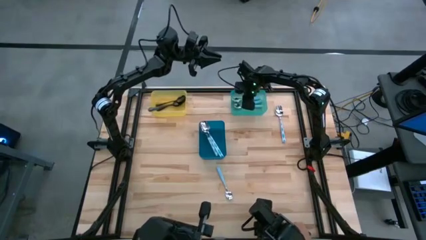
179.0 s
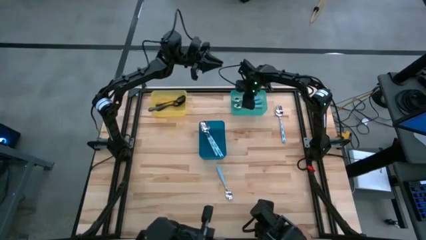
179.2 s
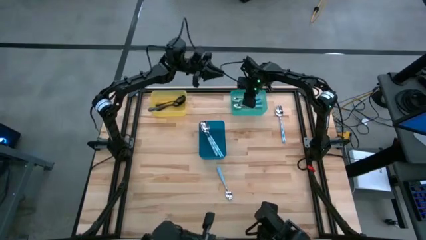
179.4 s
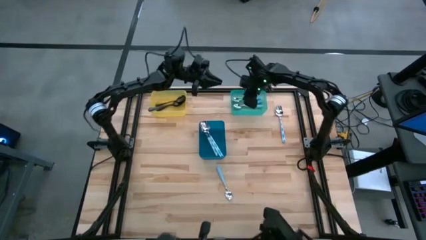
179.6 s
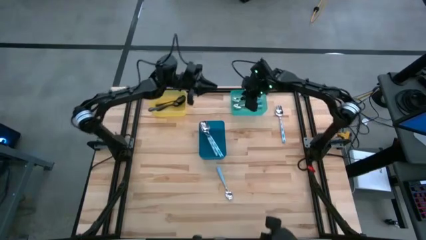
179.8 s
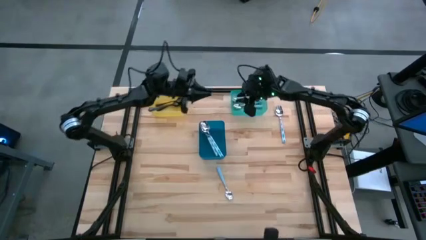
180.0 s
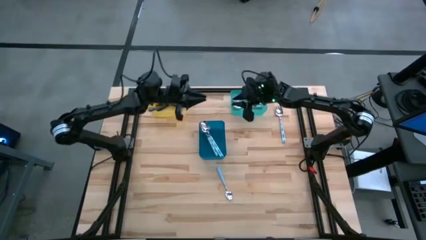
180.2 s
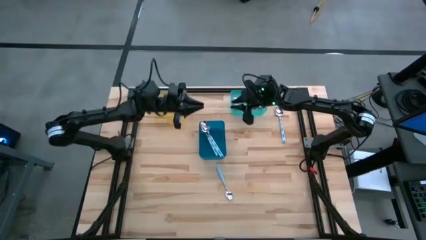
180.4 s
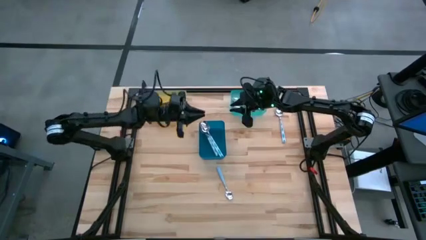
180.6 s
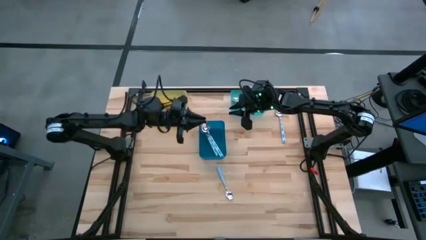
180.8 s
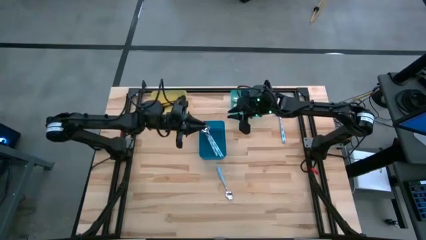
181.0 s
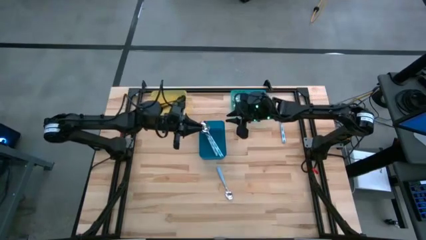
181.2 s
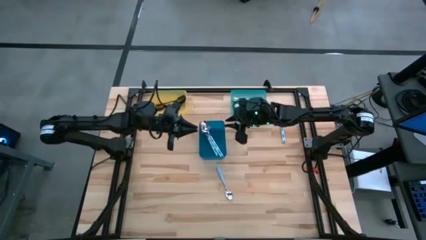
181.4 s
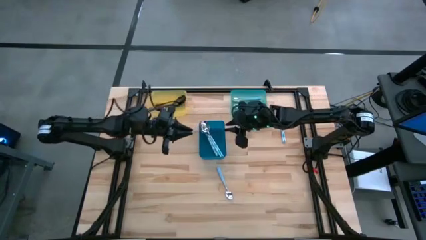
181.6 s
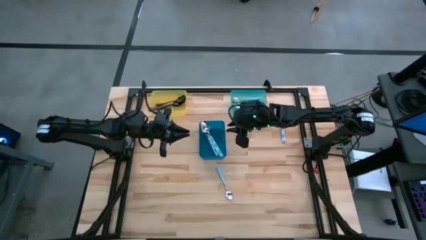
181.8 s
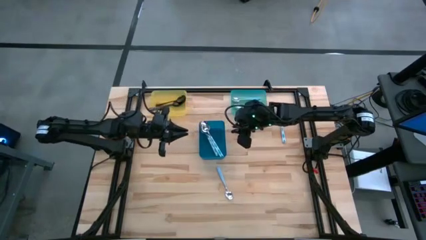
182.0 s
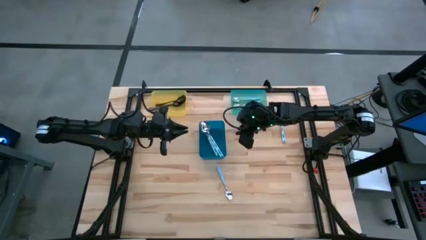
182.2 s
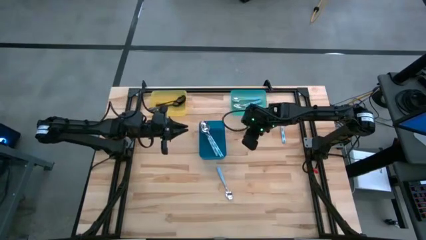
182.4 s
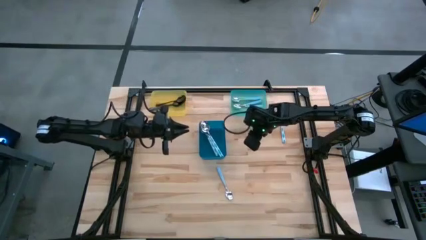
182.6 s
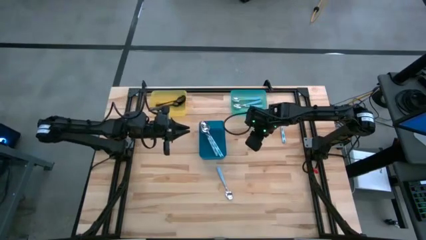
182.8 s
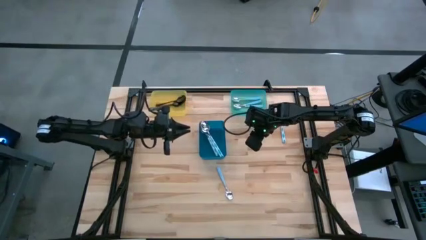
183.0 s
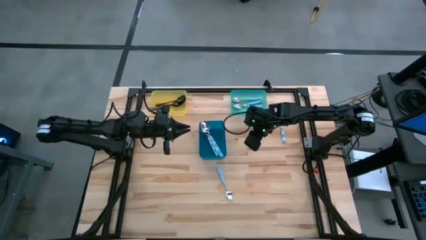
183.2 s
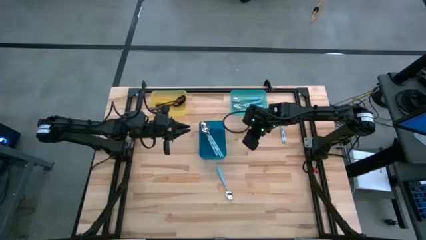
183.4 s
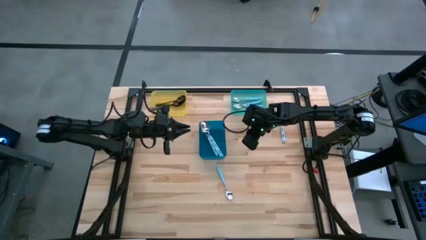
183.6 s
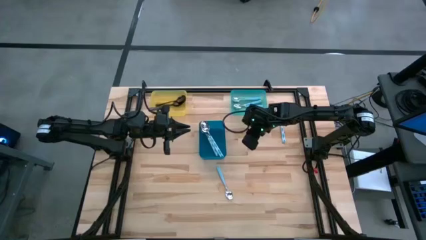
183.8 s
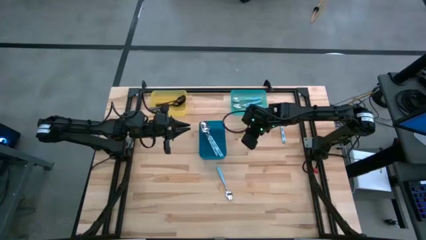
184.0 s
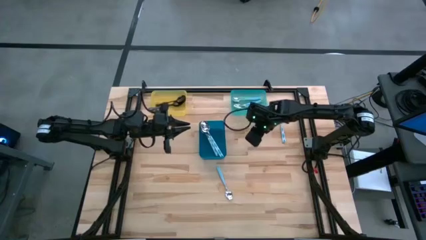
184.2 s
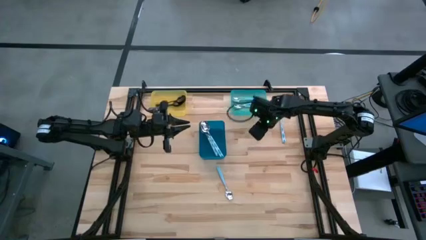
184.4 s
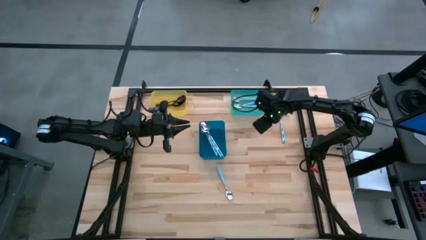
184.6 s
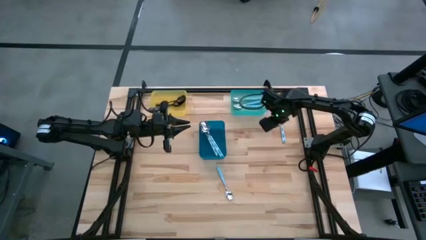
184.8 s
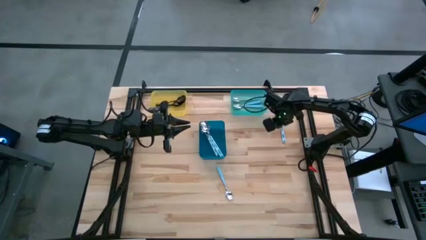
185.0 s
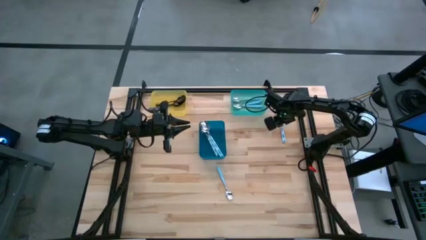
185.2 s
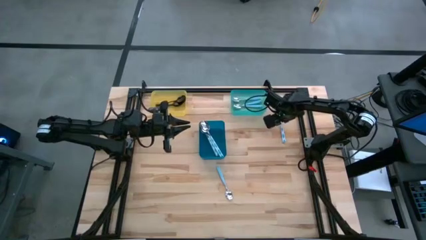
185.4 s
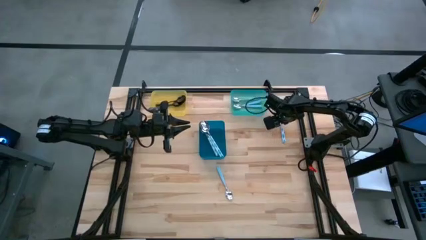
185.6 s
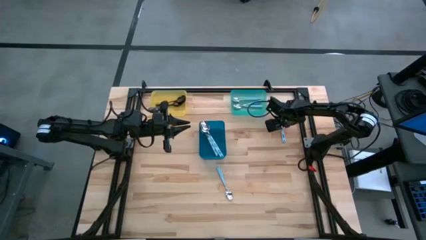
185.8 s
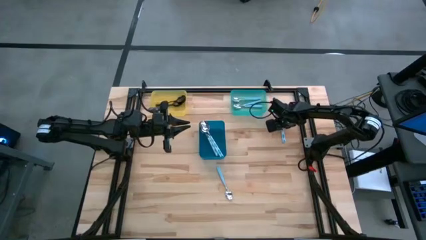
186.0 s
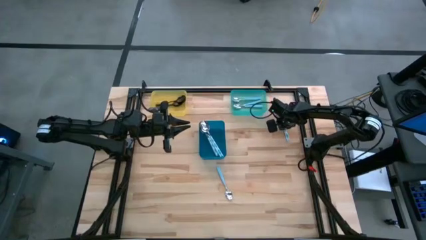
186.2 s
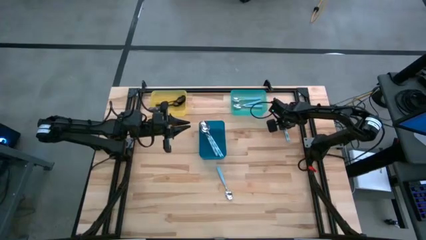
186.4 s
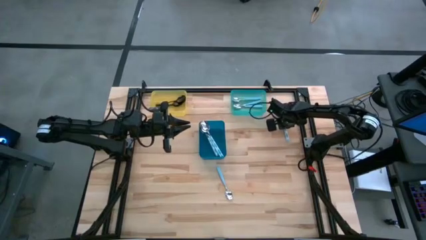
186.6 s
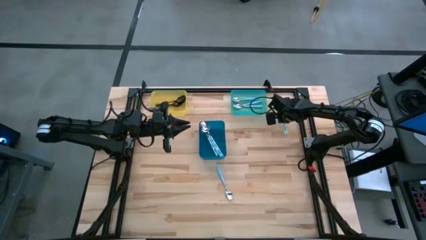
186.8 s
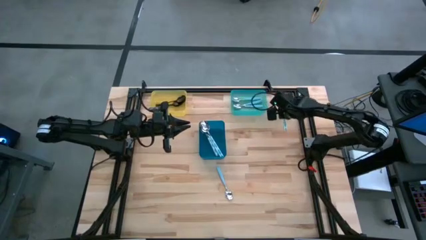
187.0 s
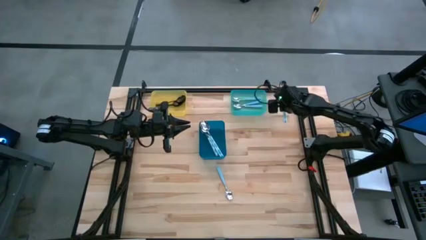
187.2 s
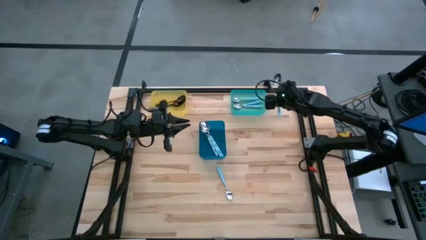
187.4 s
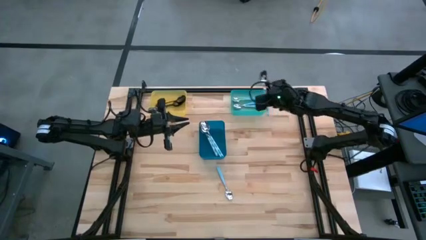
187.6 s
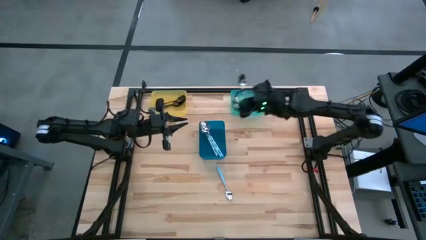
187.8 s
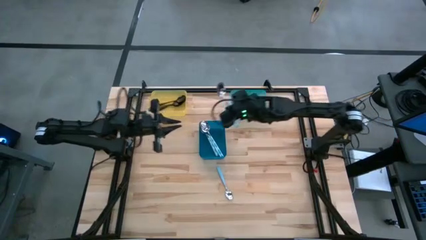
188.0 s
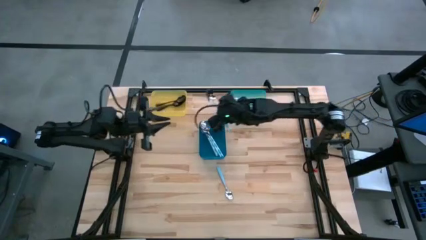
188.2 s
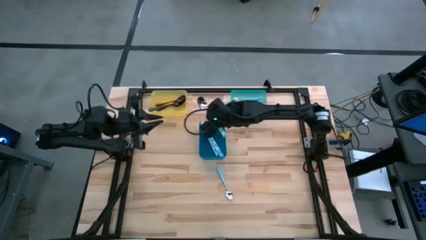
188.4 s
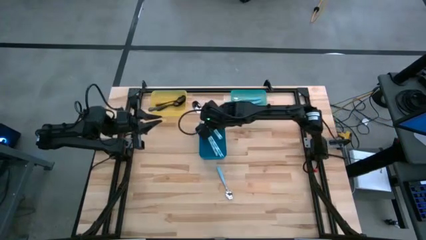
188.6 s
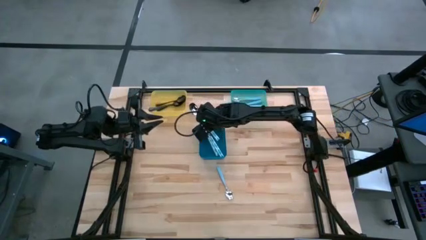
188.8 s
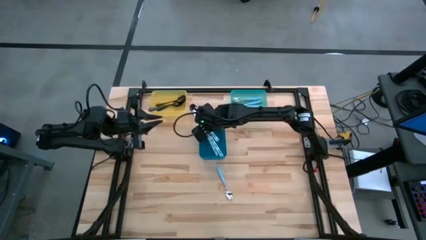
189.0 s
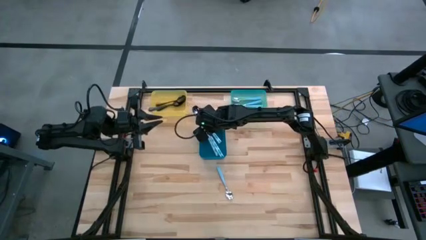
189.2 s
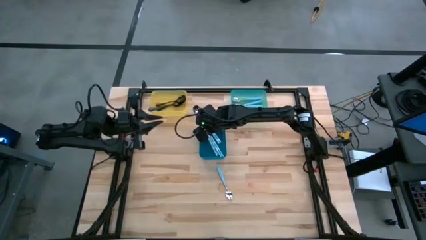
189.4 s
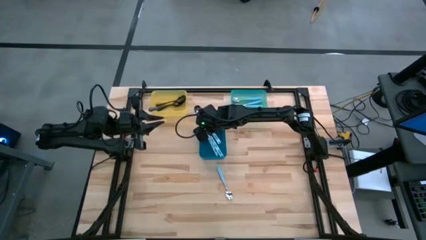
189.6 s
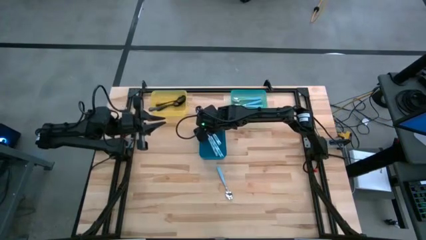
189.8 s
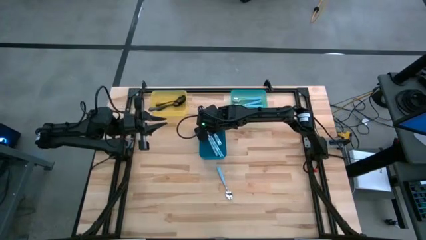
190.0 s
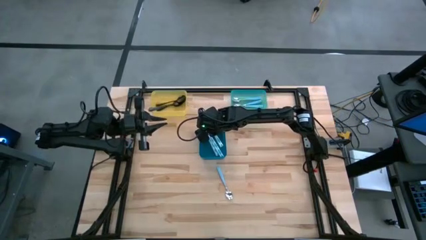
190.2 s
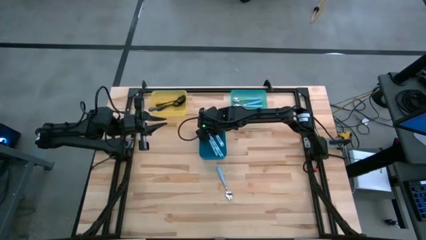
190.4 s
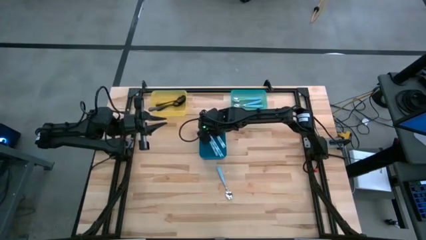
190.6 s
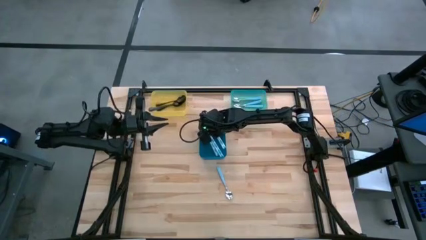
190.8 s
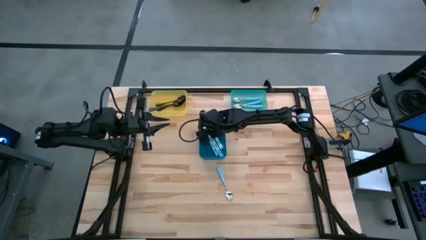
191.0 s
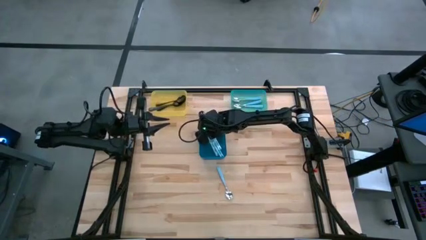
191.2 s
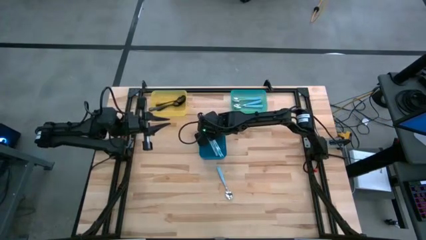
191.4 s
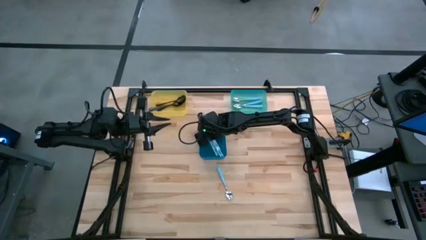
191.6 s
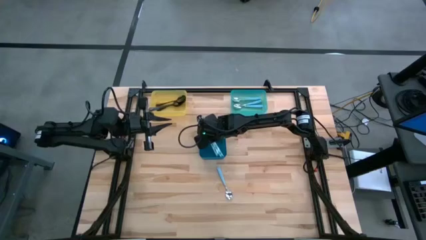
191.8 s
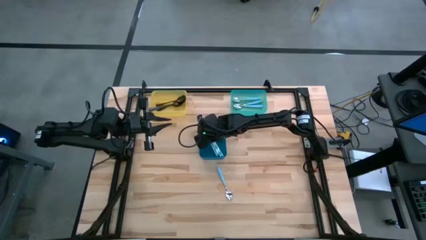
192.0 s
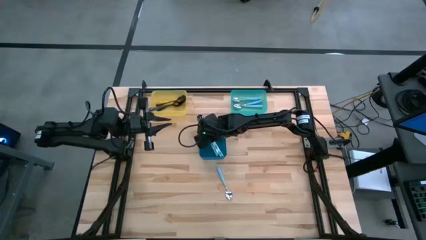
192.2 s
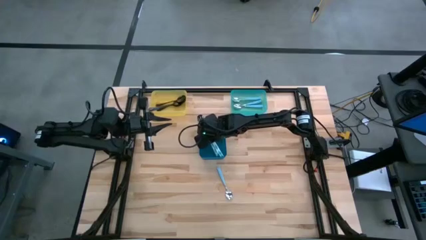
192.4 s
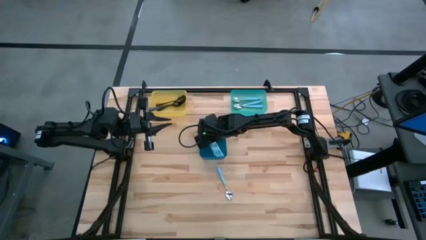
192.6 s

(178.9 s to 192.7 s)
Task: Sort silverware by color (type)
Put the white patterned spoon into the blue bin

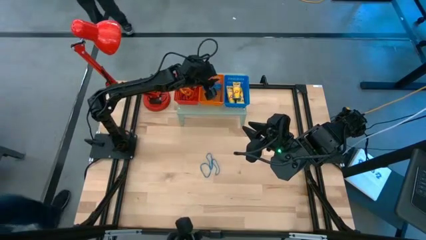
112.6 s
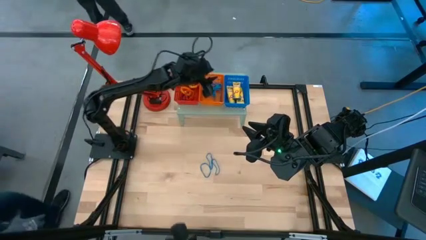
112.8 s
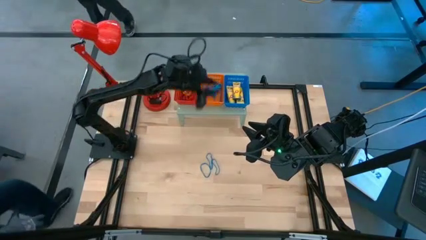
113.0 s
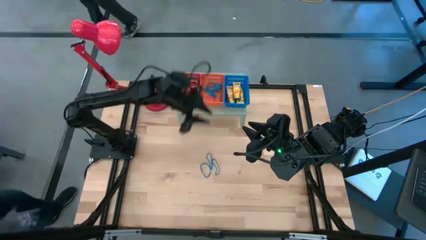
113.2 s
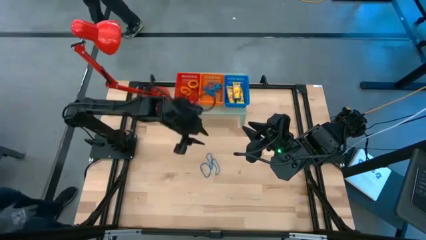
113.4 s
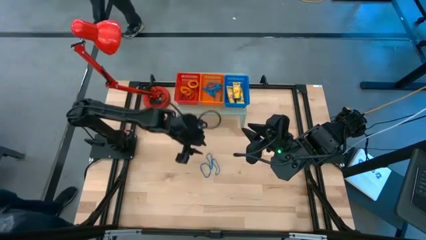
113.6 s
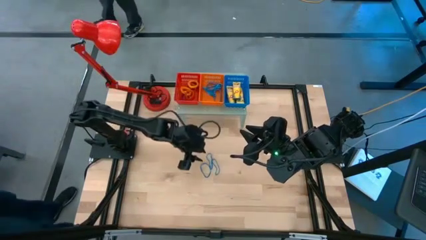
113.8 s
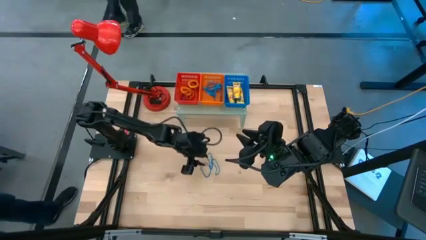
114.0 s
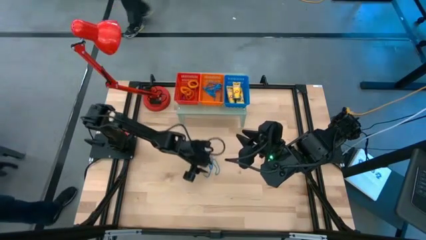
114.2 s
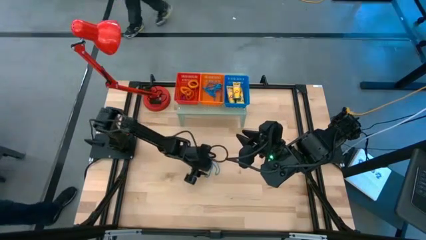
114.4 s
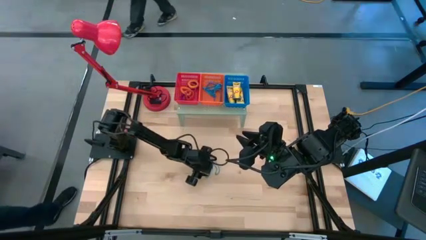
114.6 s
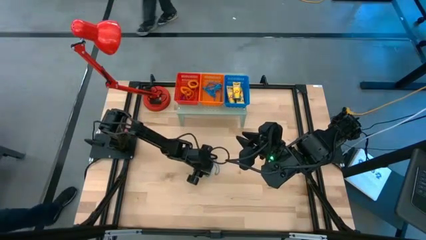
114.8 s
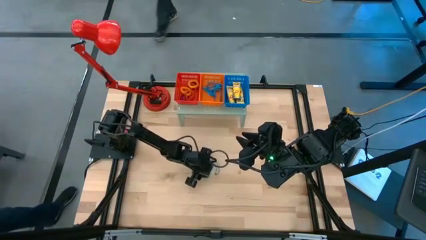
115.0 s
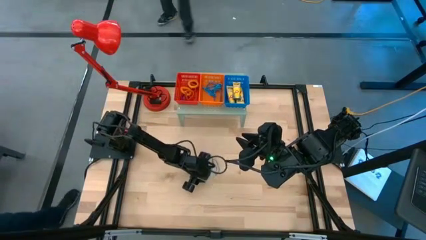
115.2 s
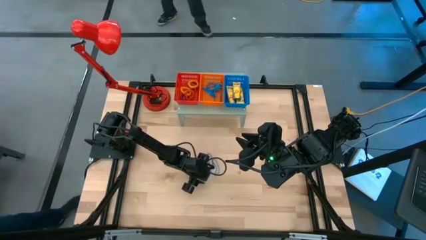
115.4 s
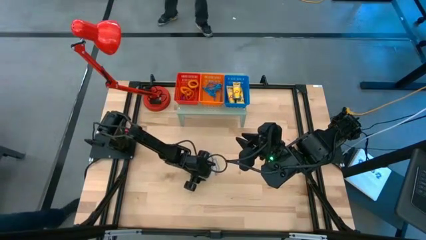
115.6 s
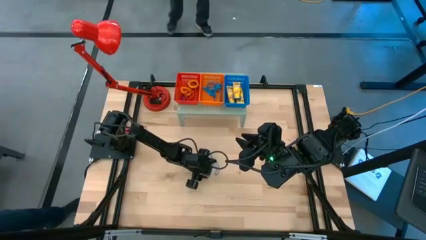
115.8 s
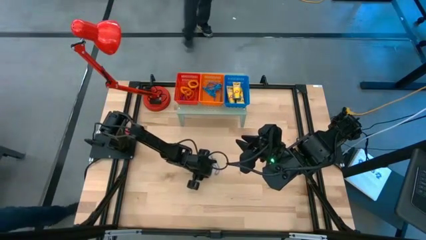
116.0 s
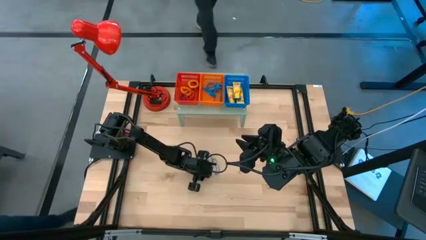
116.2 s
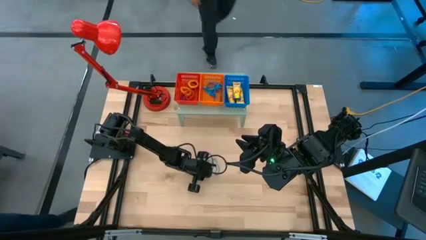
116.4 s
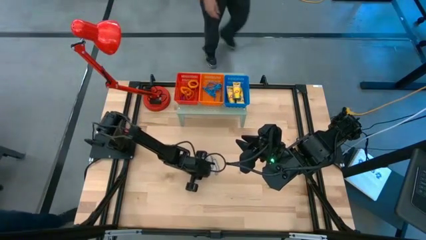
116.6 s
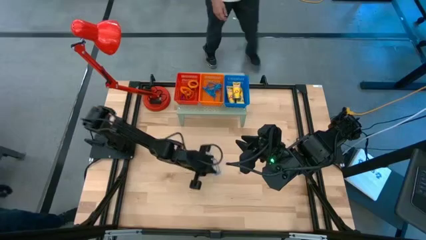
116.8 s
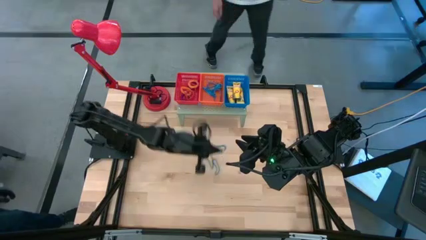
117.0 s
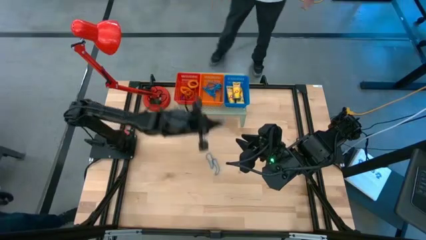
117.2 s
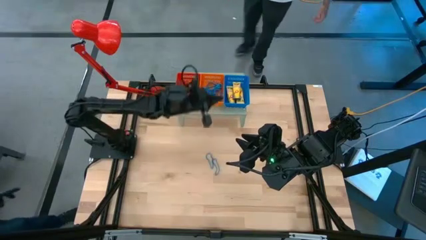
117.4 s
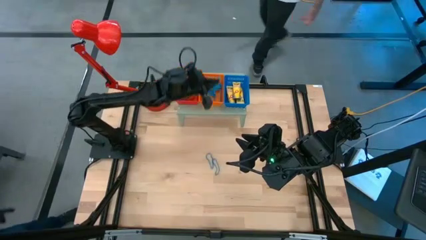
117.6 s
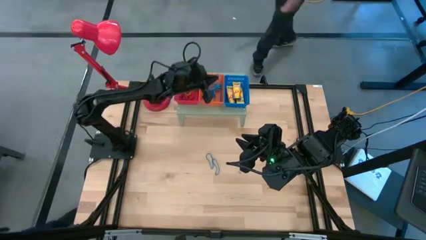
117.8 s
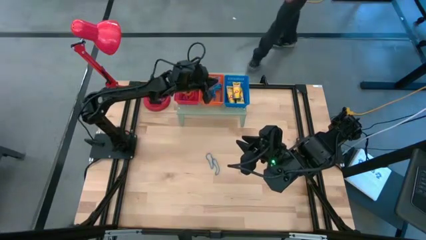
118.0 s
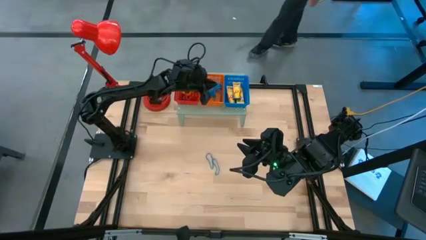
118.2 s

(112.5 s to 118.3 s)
Task: Pick & Place Office Desk Supplies
Put the blue rubber band into the orange bin on the shelf
